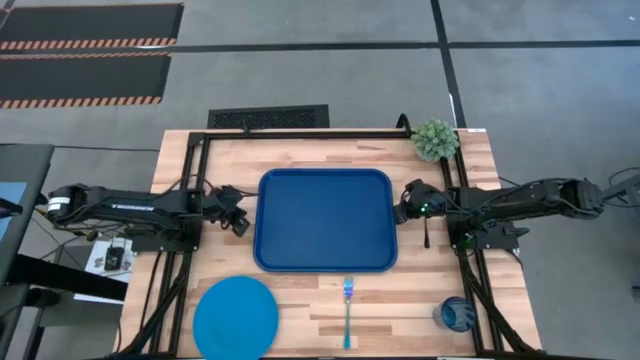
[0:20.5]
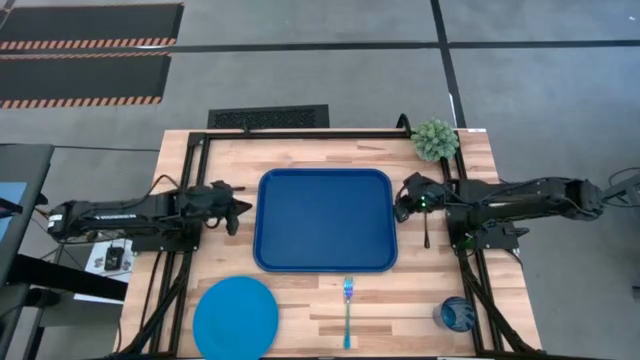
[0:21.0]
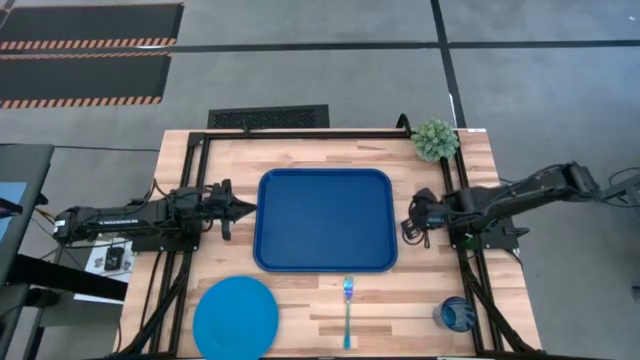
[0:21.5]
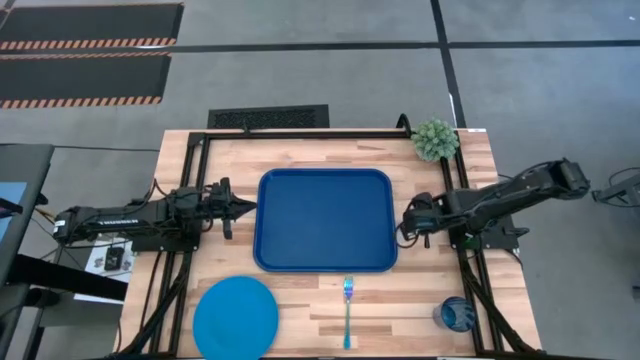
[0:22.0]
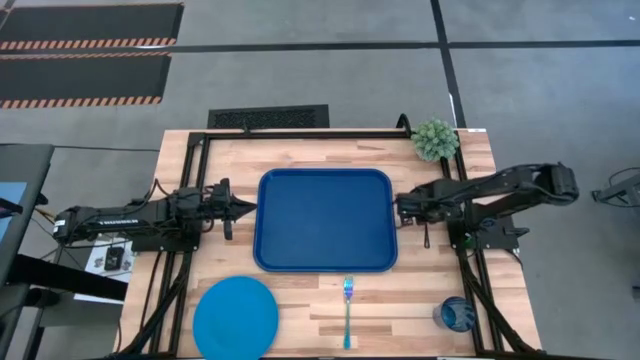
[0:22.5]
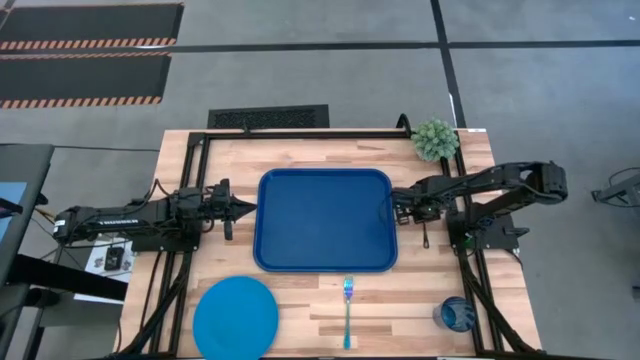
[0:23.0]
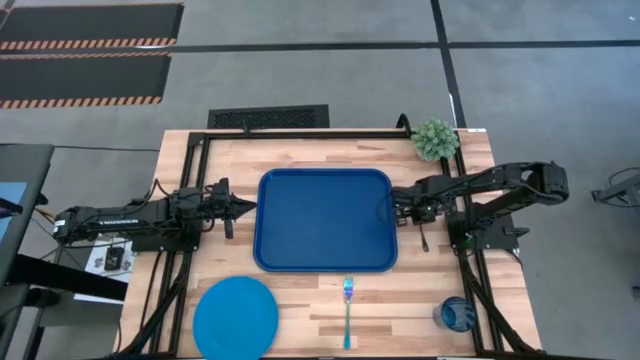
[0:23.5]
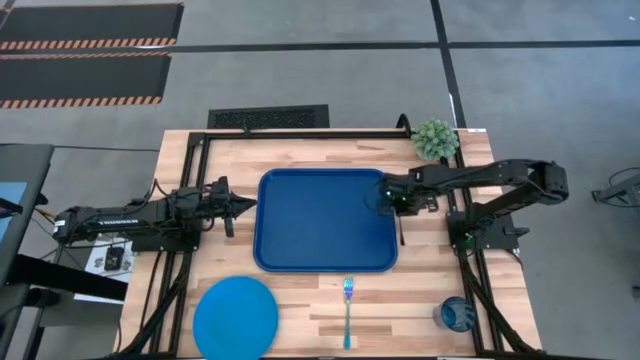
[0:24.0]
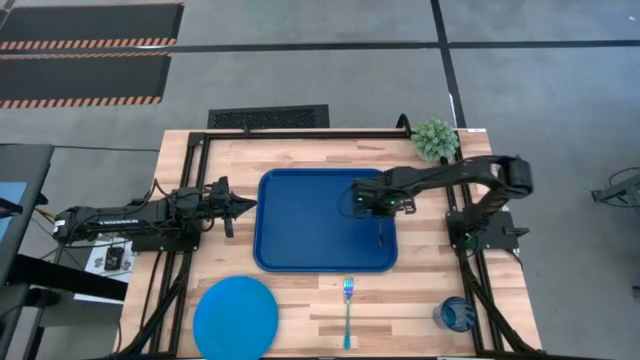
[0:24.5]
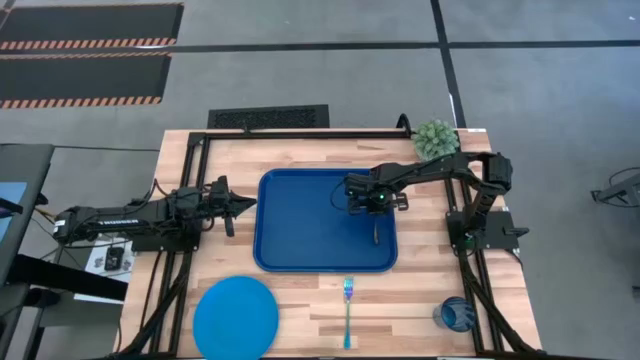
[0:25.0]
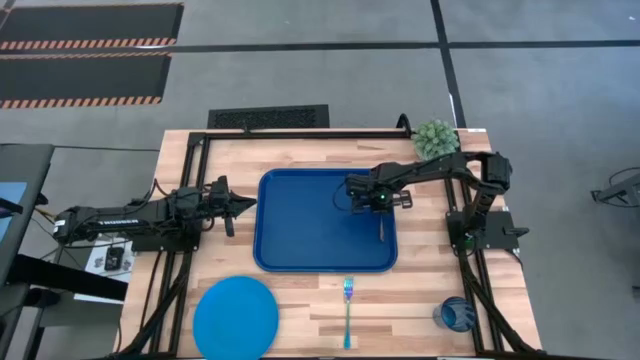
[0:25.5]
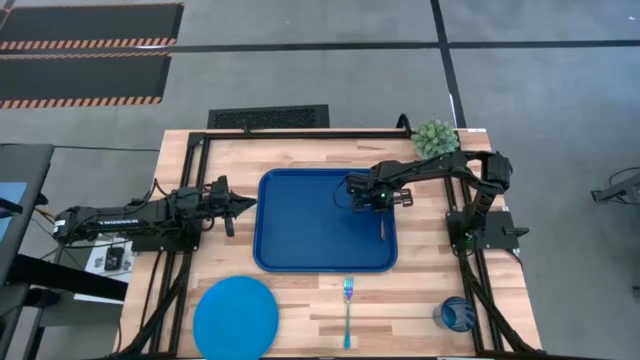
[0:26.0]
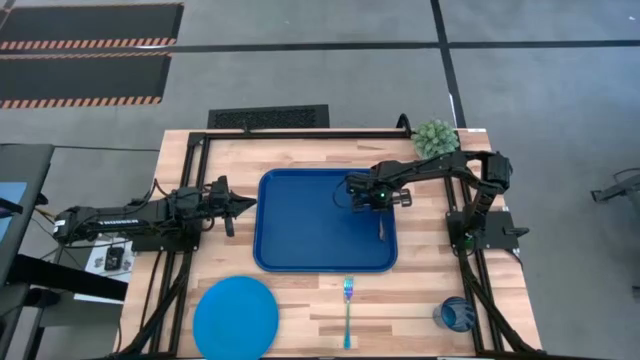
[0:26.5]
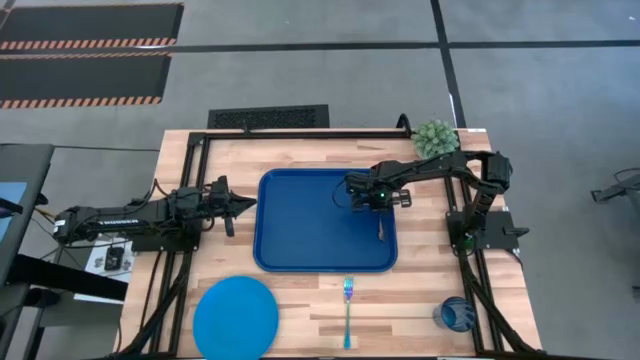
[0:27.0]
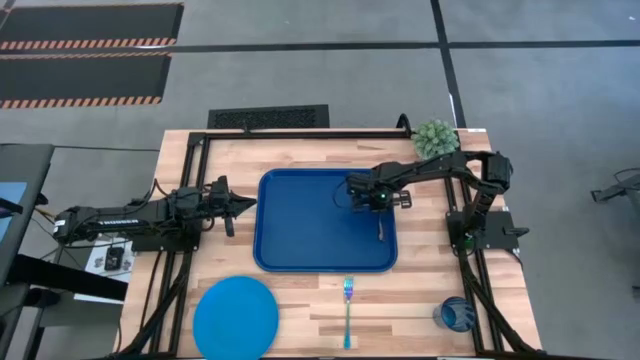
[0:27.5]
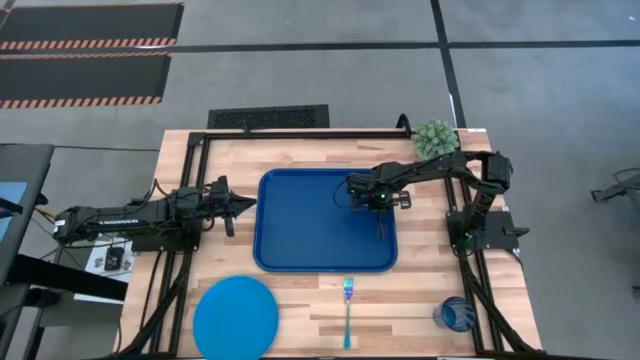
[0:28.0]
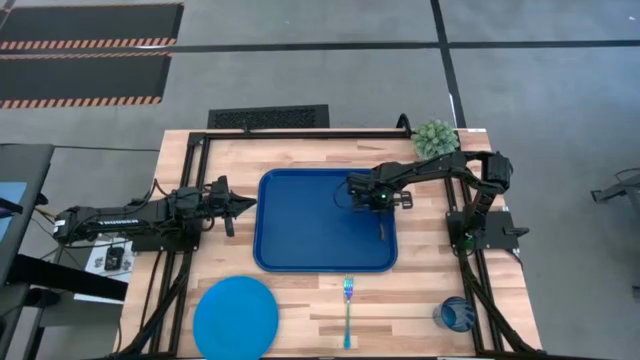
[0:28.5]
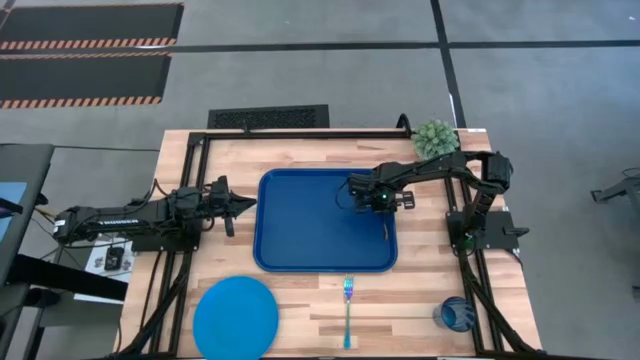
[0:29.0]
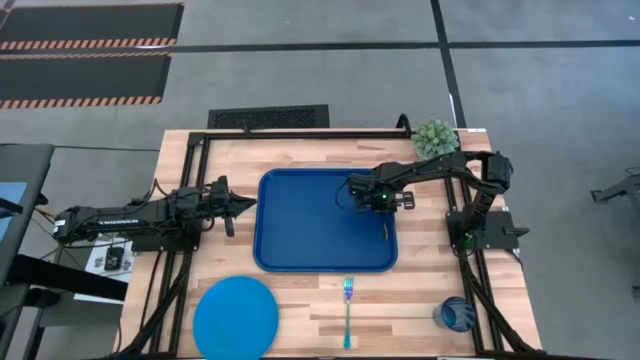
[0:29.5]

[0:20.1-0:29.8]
Task: Pick and place plate/cup/fork/spoon on tray
Put the black spoon on the right of the blue serving tray

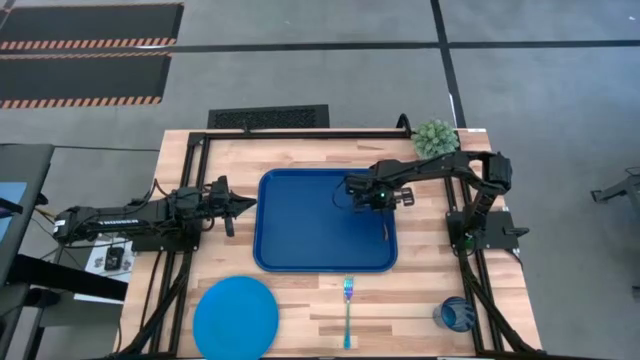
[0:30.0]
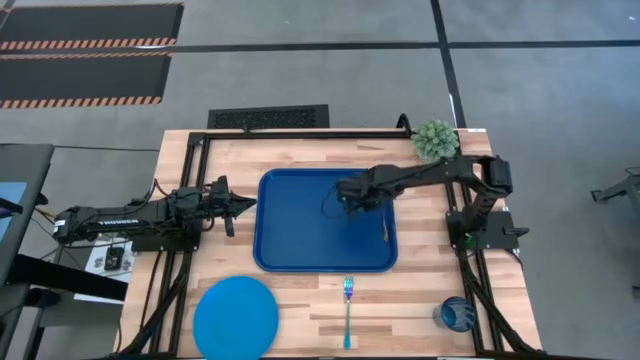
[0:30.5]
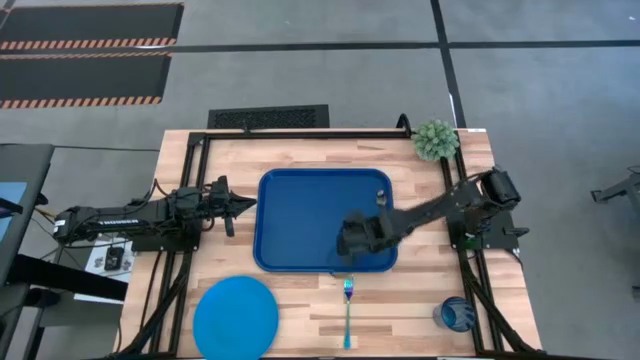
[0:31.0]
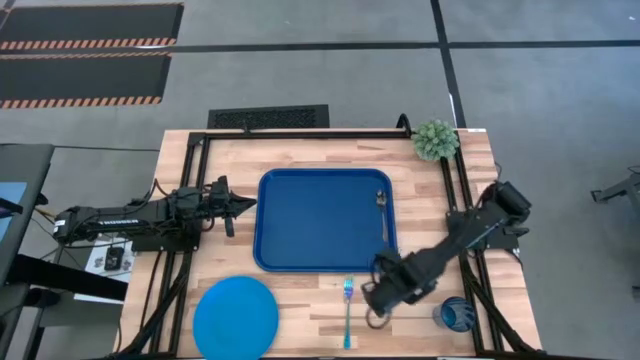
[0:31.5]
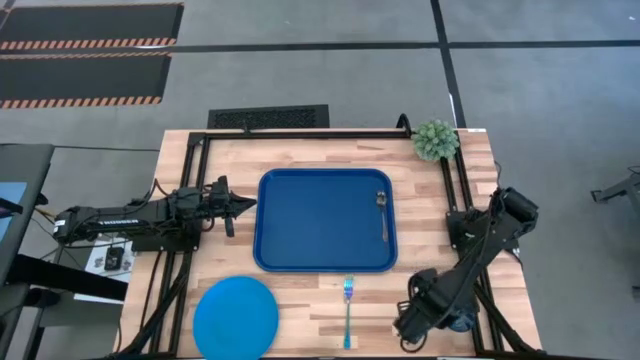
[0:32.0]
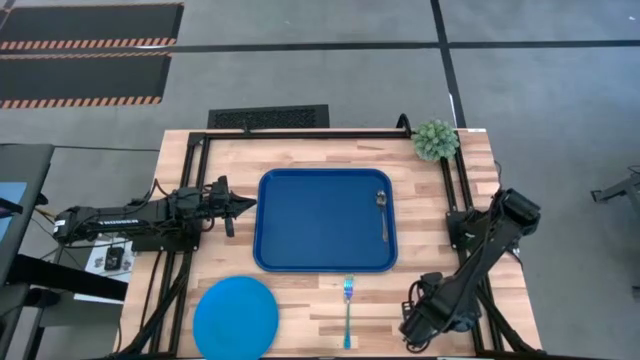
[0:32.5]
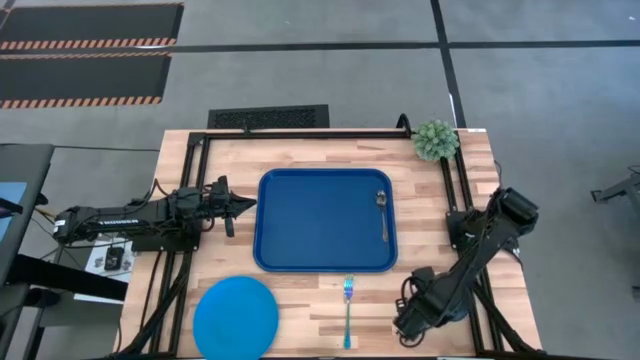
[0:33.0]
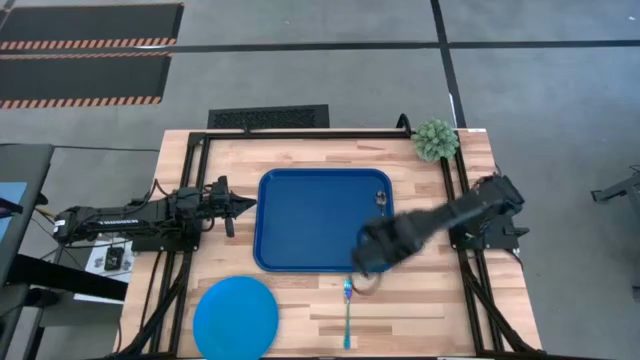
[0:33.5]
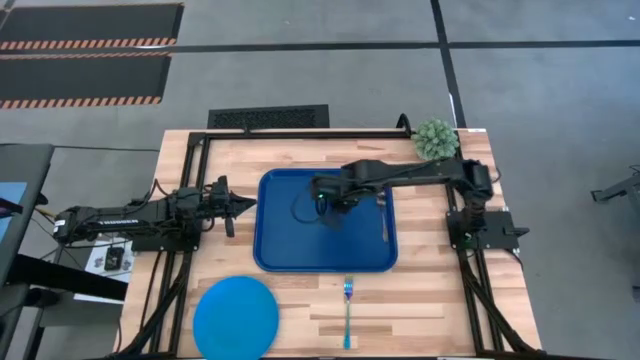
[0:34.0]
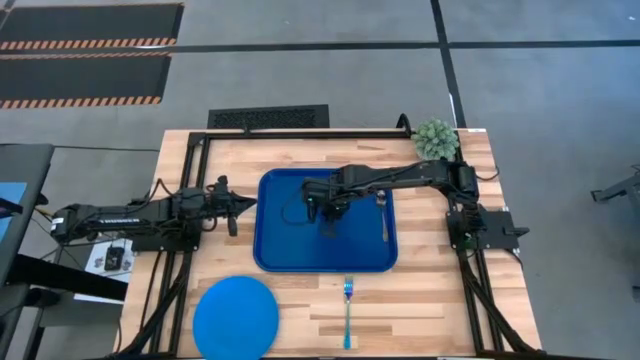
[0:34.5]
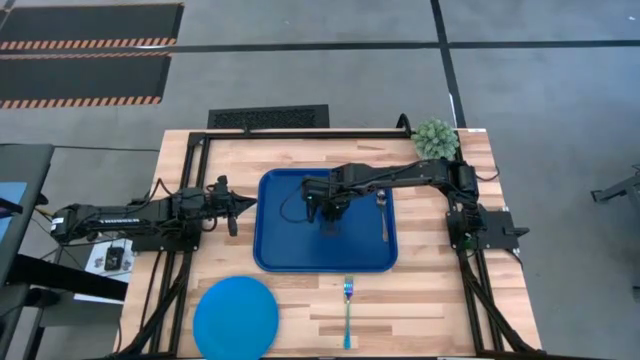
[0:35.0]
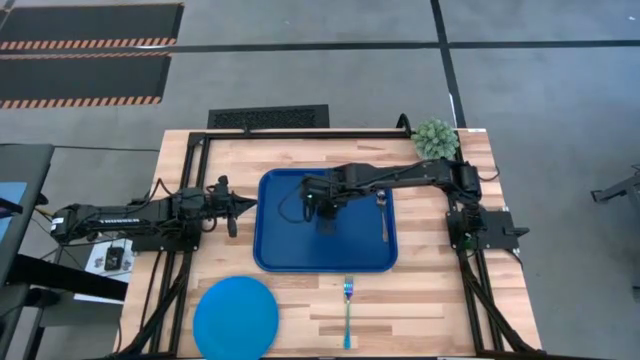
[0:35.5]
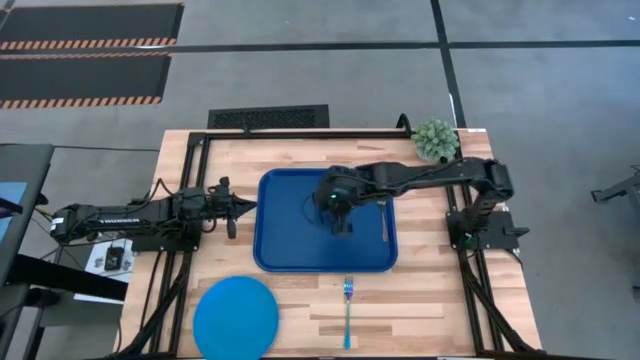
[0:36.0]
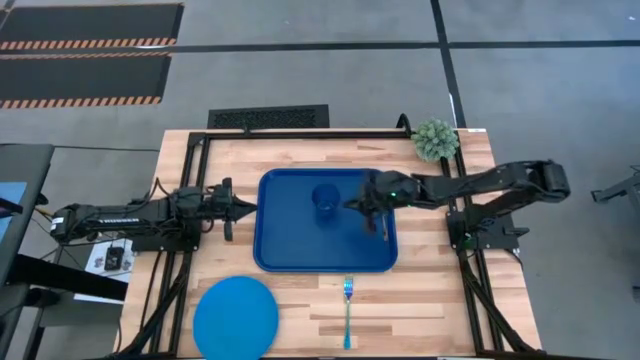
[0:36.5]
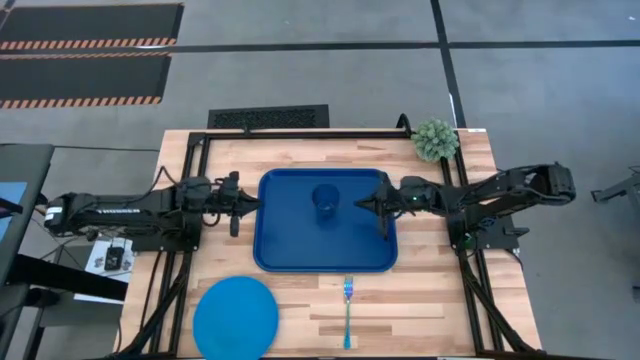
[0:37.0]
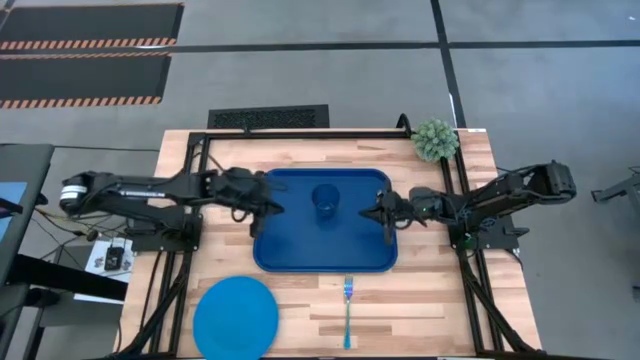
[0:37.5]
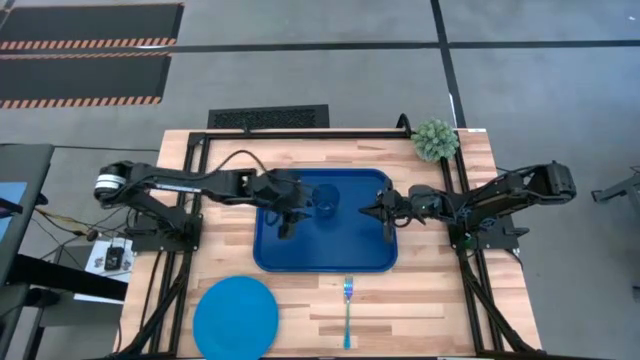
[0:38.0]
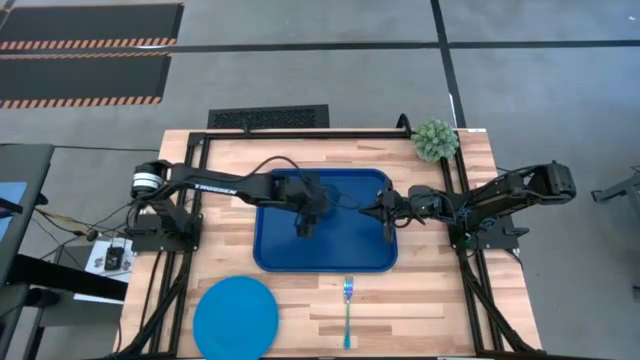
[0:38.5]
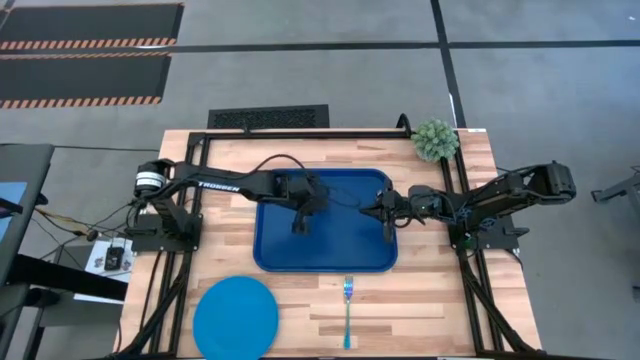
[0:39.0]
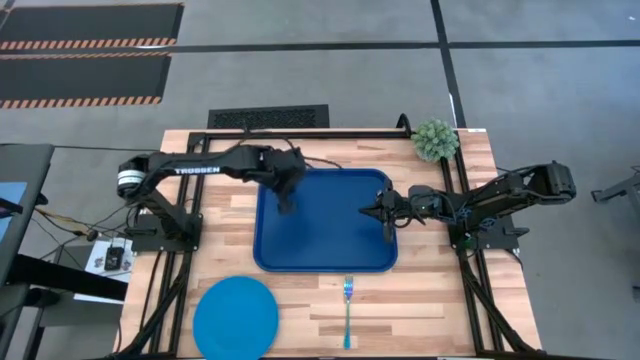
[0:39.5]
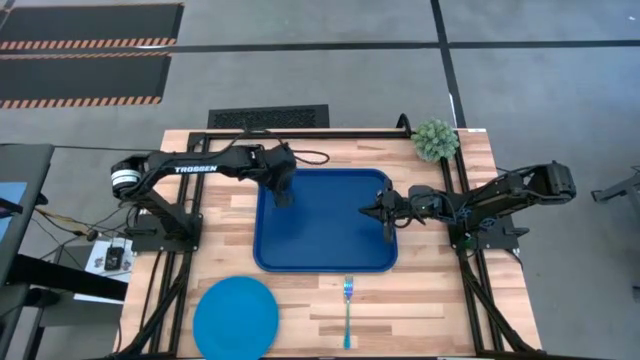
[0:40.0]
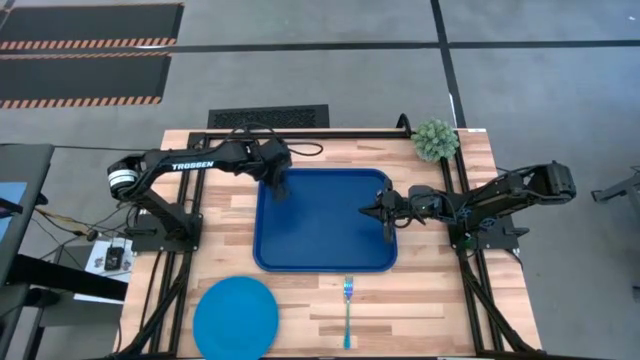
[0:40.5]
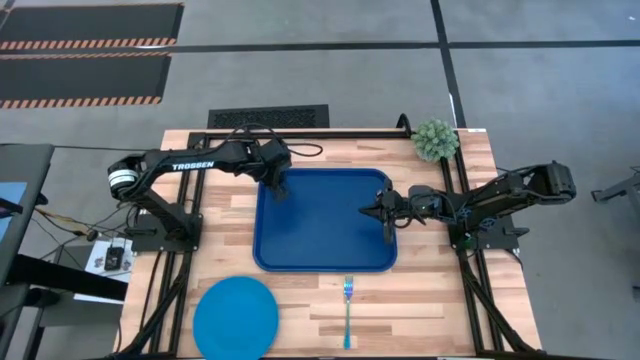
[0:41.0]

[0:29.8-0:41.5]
Put the blue cup on the top left of the blue serving tray
